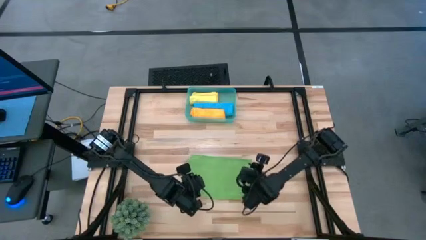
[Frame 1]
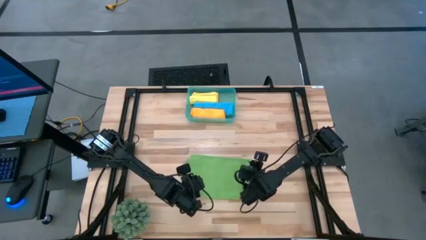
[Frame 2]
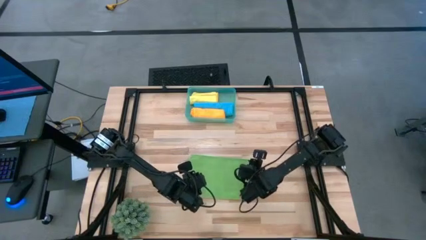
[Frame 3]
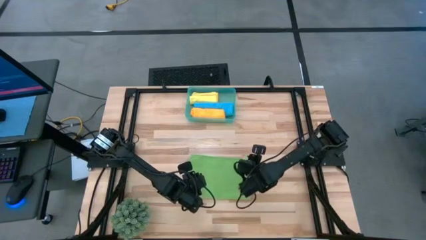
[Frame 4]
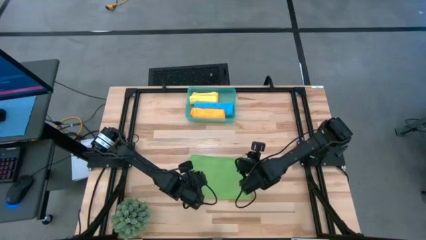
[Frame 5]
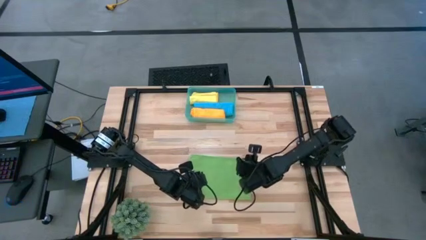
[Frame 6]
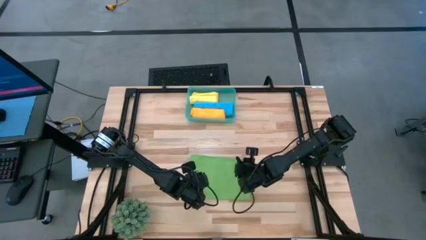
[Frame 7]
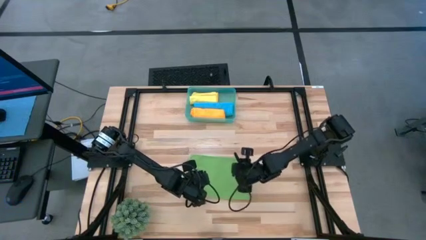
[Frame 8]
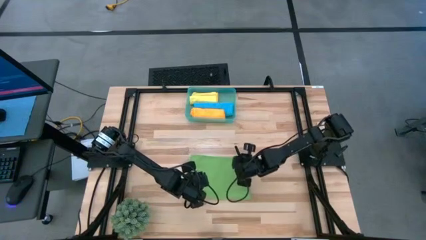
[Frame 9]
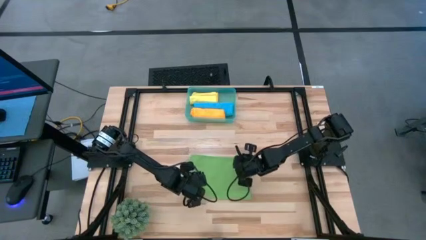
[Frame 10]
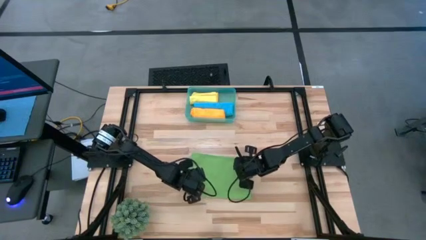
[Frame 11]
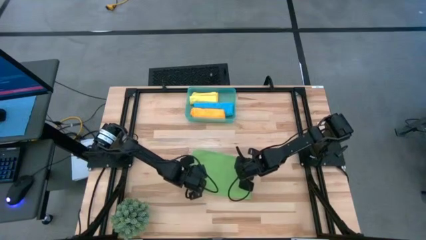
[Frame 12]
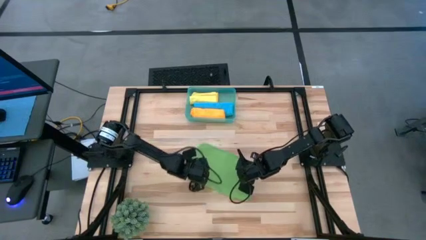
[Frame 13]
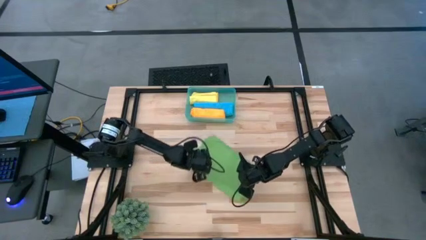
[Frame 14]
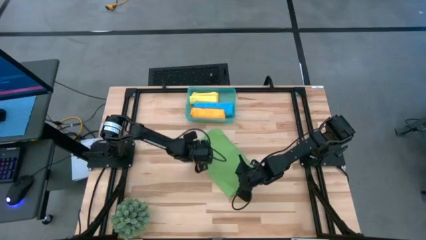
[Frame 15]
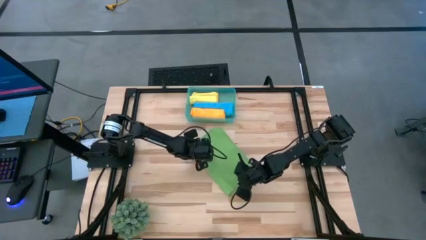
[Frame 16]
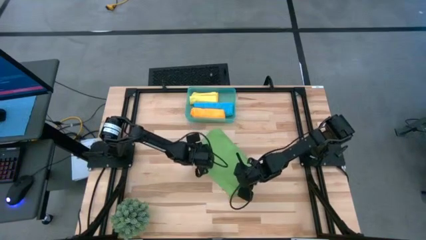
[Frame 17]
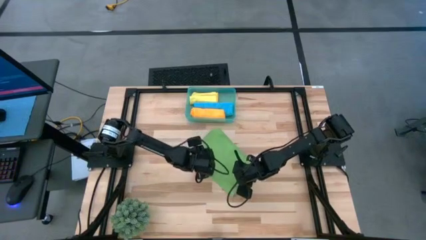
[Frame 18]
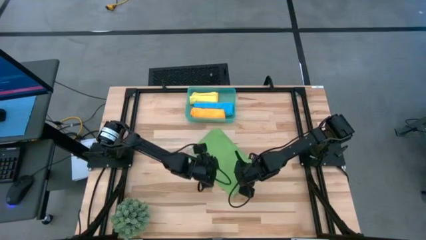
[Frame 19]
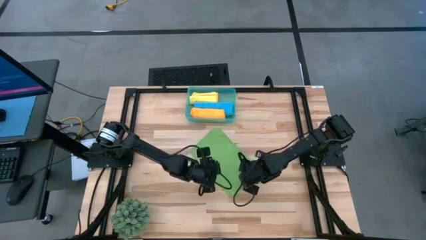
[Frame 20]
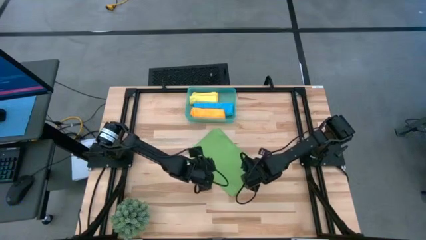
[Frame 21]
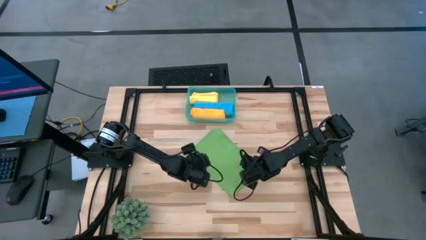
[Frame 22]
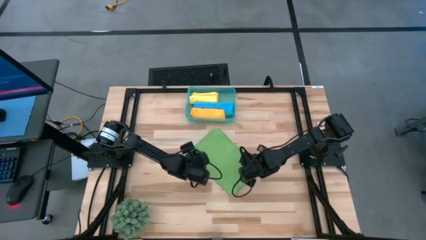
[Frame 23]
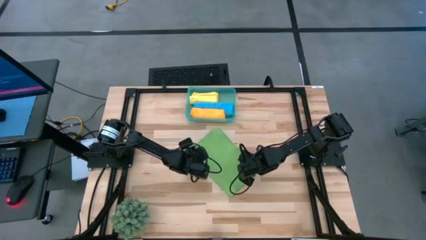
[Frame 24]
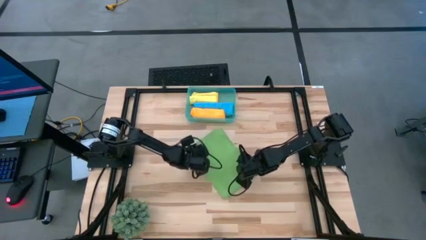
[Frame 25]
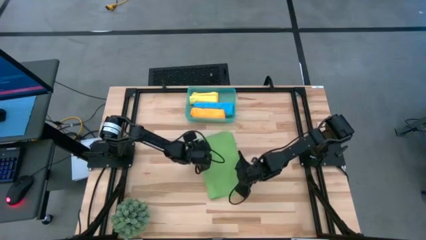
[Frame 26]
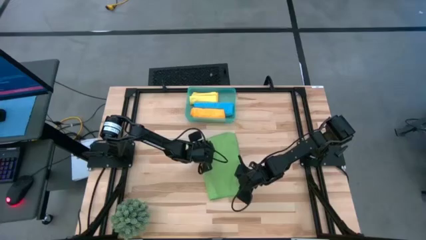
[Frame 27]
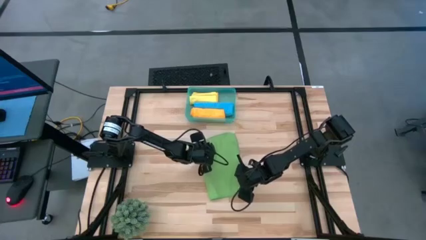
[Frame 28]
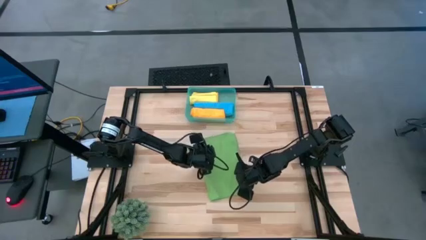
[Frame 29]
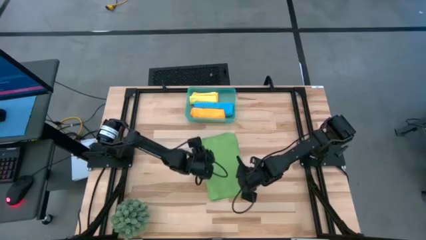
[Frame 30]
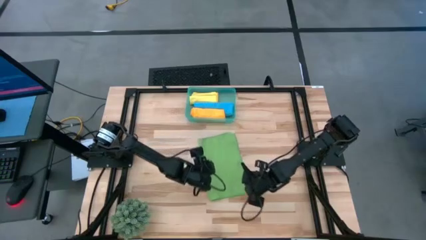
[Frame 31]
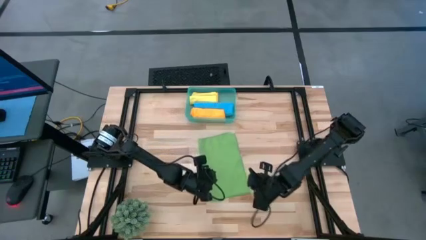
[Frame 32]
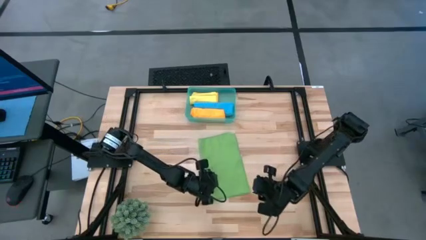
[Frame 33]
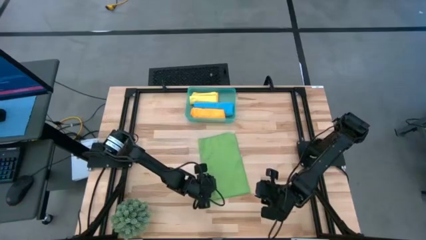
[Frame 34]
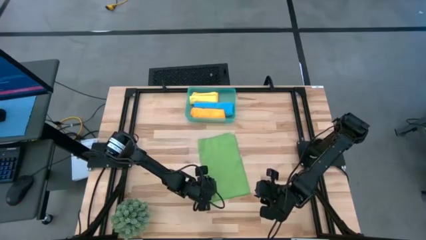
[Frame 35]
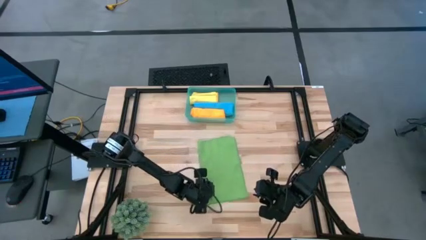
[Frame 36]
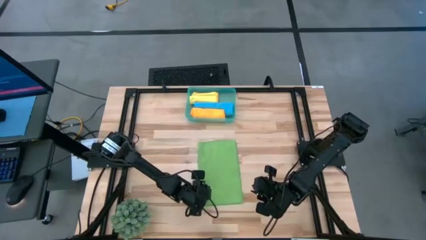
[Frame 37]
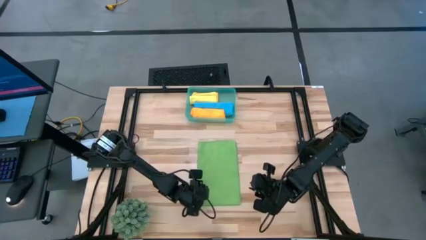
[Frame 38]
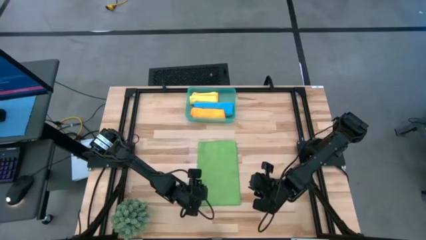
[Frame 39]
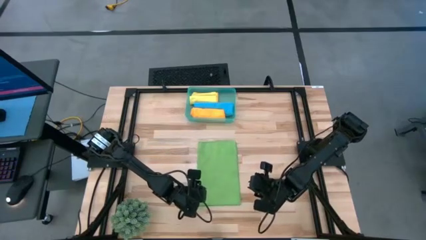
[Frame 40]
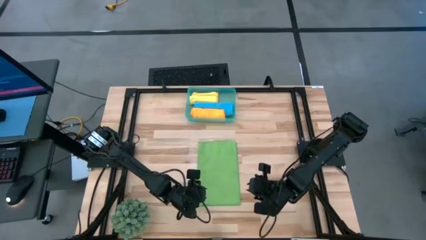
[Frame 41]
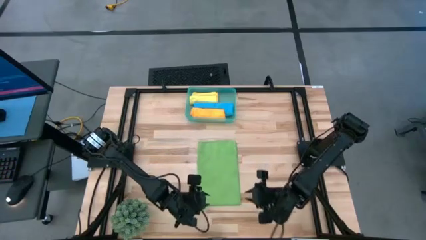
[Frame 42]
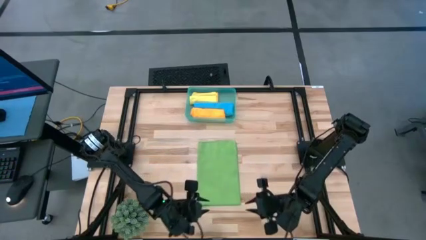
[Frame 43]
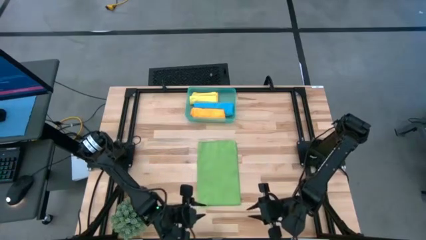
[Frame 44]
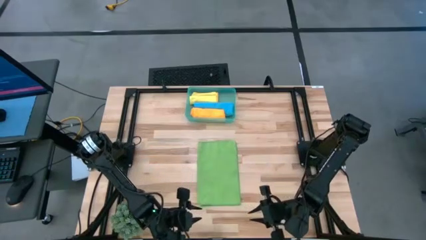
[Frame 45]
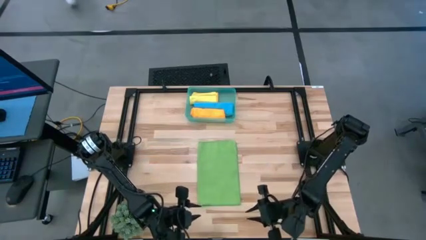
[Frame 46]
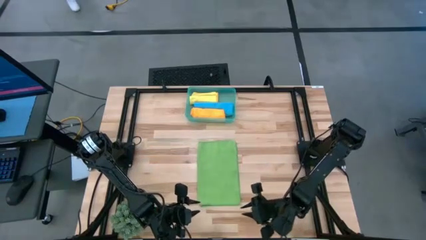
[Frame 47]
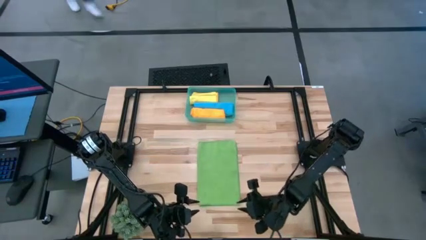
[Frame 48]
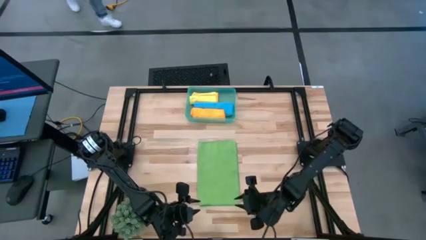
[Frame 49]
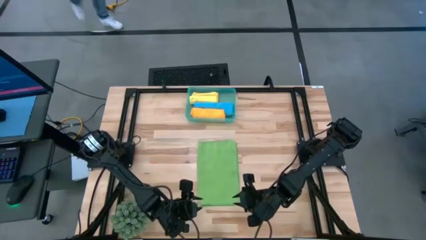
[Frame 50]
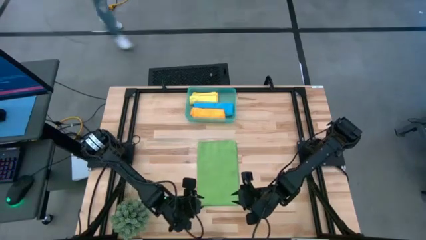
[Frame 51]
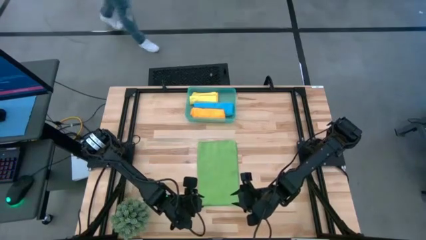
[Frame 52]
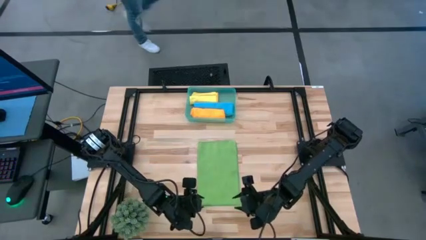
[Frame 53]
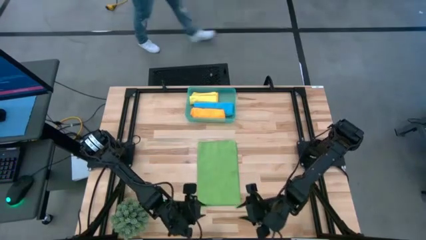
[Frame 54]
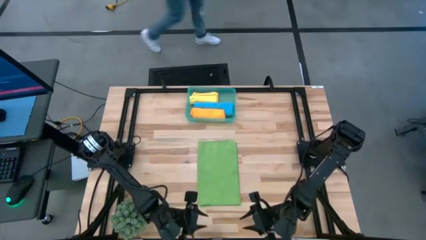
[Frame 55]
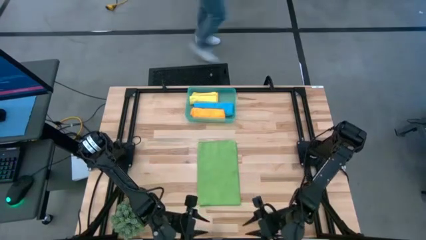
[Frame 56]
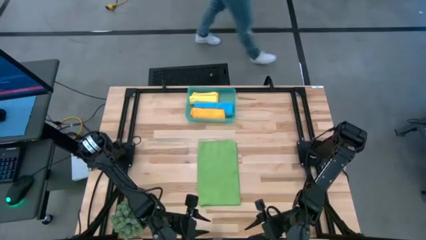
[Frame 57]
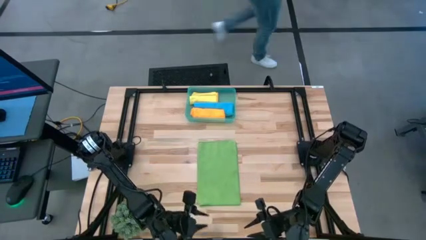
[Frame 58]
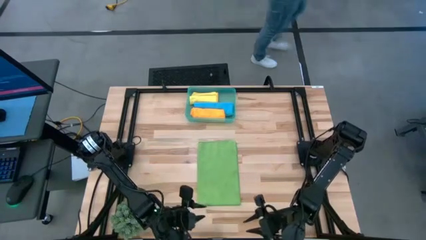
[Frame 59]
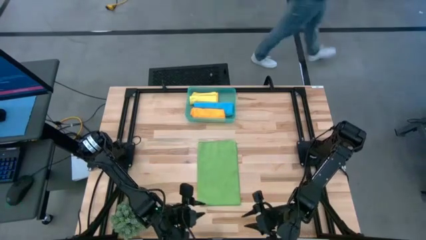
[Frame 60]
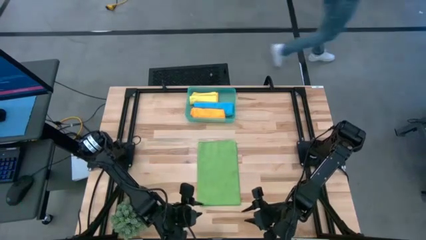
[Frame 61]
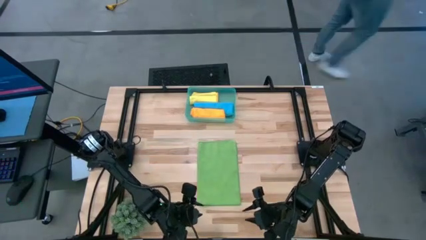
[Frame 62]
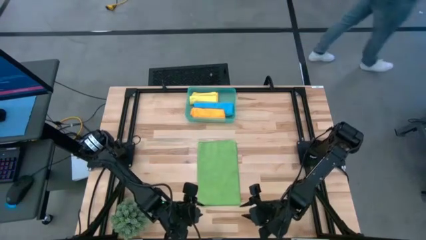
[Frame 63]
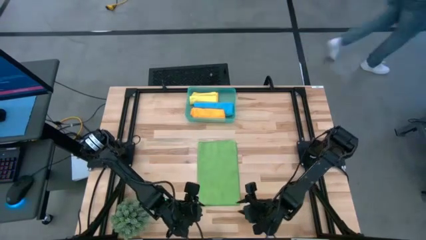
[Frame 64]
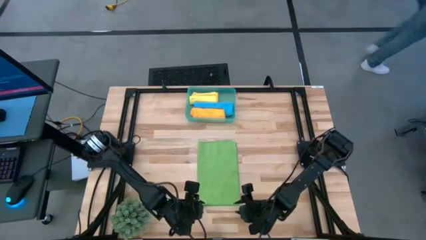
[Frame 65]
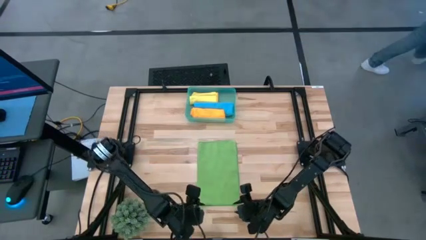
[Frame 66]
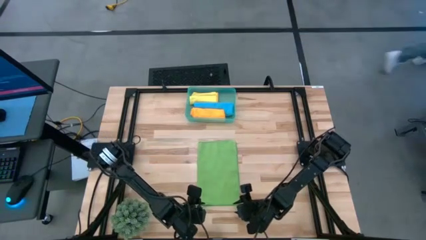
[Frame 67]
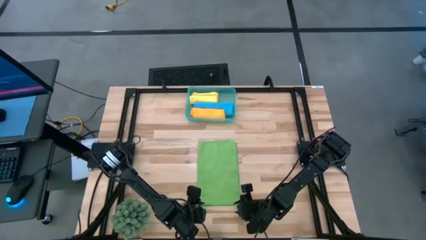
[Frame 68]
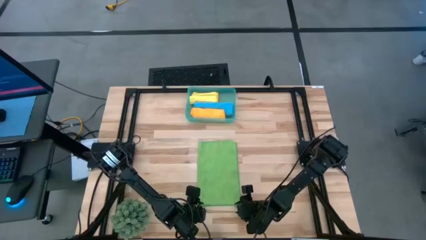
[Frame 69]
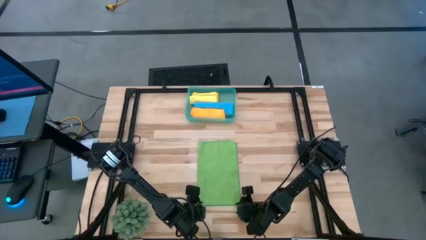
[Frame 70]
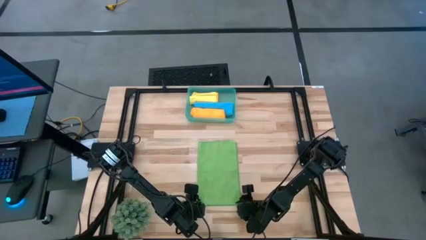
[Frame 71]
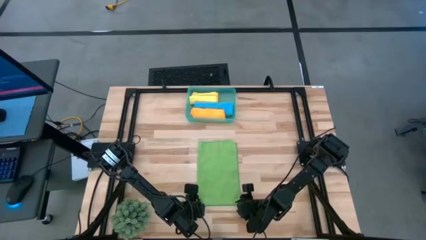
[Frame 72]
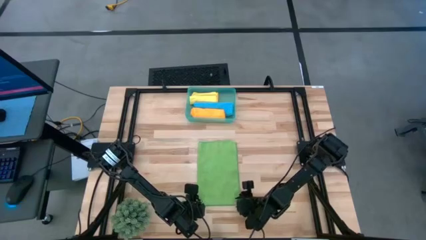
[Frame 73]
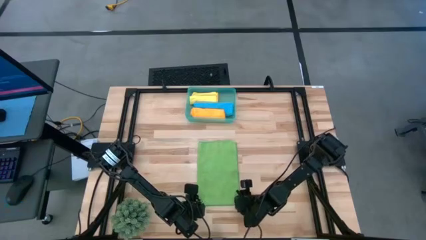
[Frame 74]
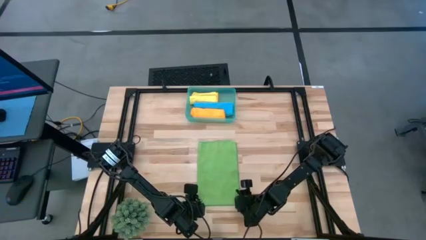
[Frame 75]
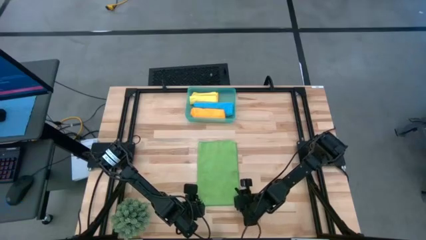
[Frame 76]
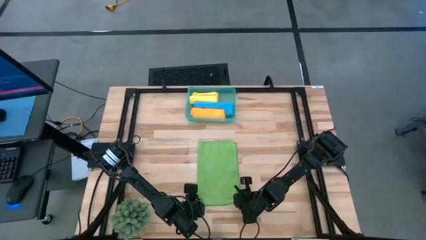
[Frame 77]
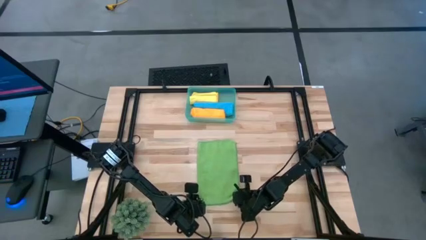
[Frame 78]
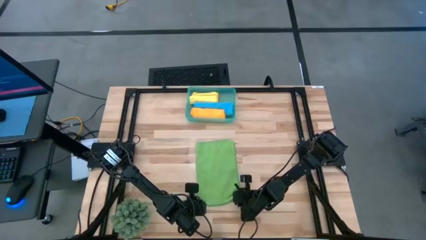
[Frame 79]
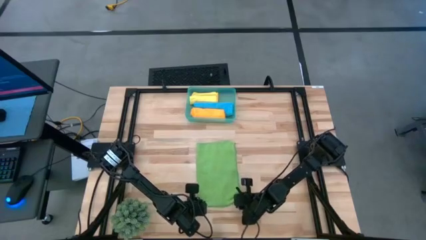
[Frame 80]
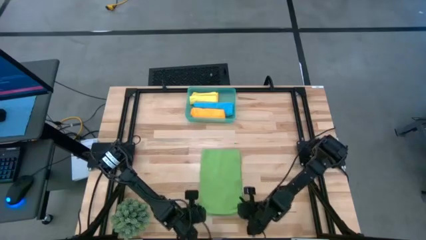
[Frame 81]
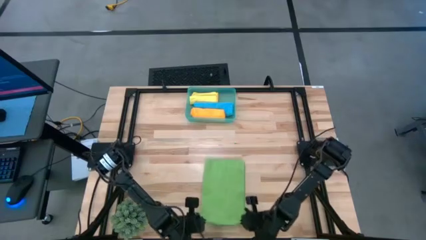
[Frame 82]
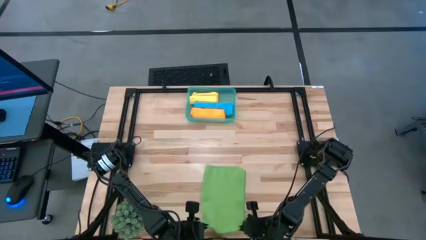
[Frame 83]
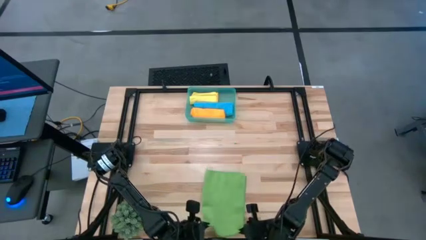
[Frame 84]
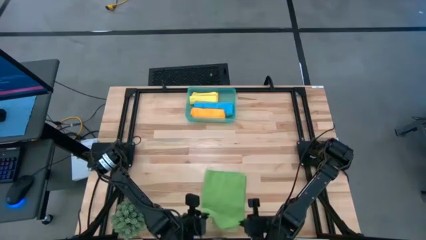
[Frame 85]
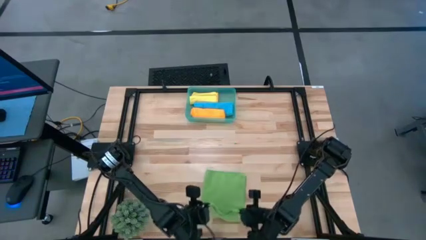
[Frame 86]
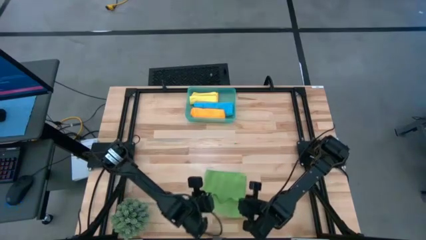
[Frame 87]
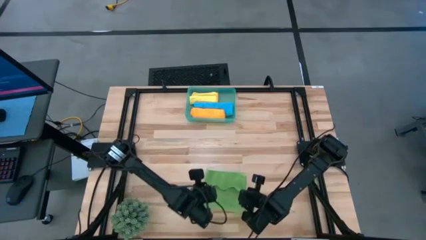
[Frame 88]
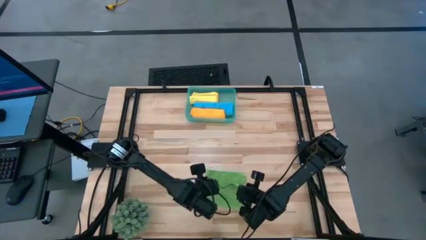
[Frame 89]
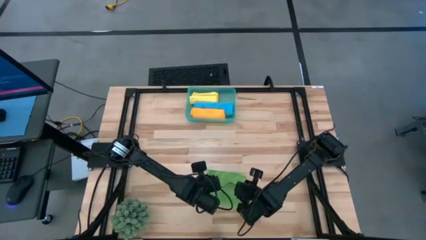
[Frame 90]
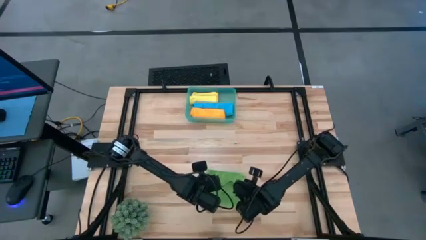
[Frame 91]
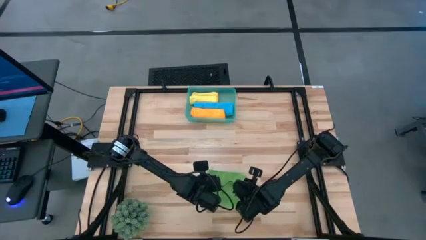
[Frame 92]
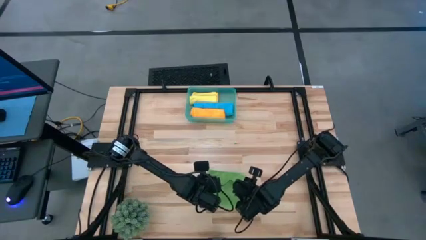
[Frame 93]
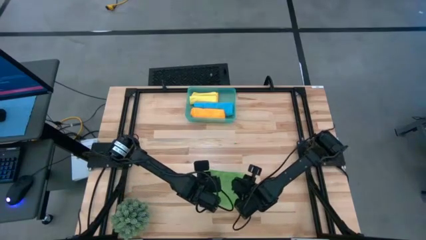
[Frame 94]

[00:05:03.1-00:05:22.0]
Task: Roll microfiber towels into tight, uniform cylinder then place into a basket
Fold the green microfiber towel
